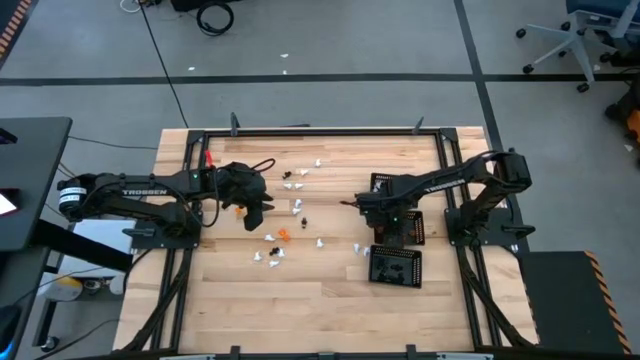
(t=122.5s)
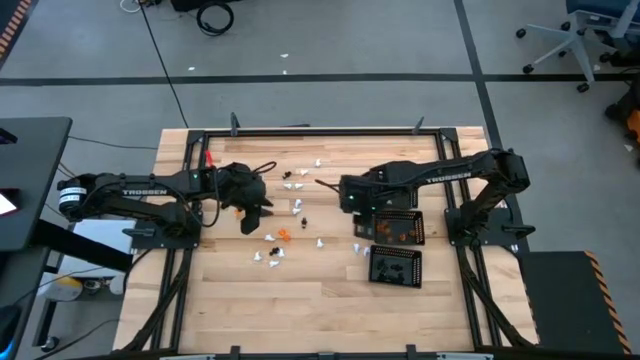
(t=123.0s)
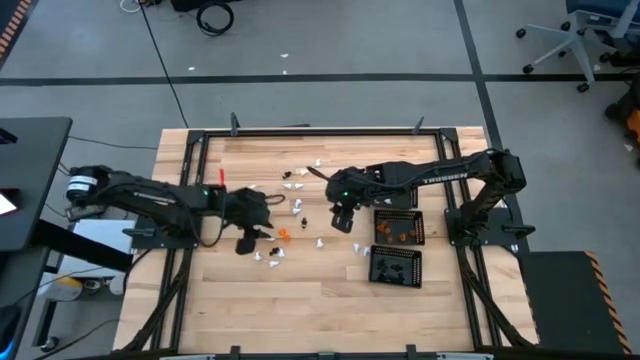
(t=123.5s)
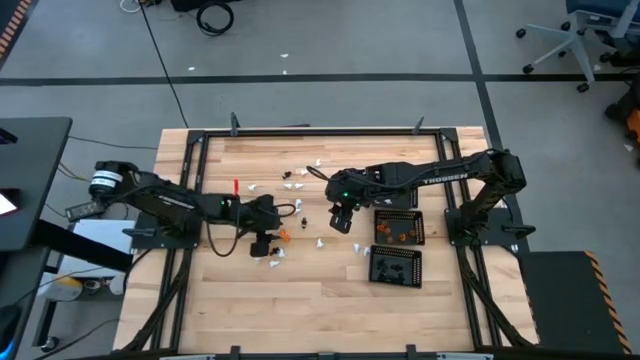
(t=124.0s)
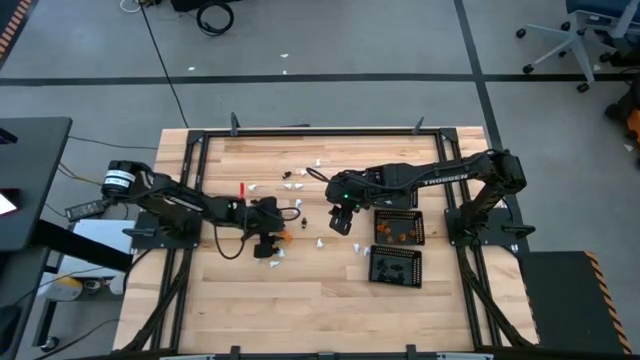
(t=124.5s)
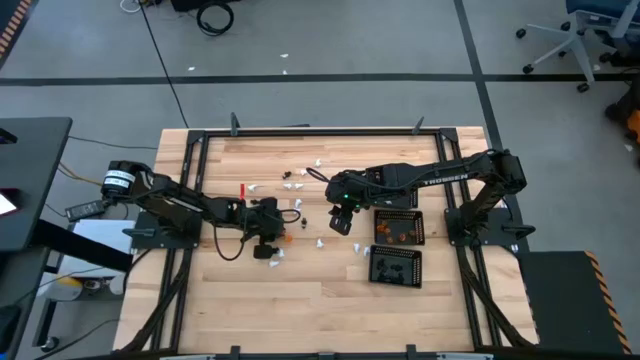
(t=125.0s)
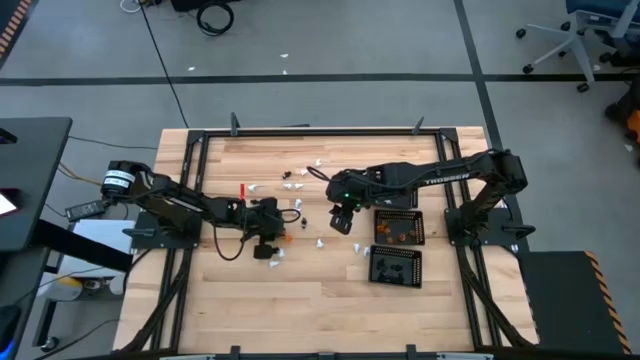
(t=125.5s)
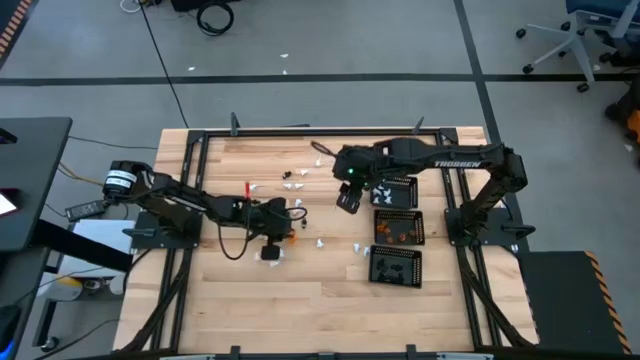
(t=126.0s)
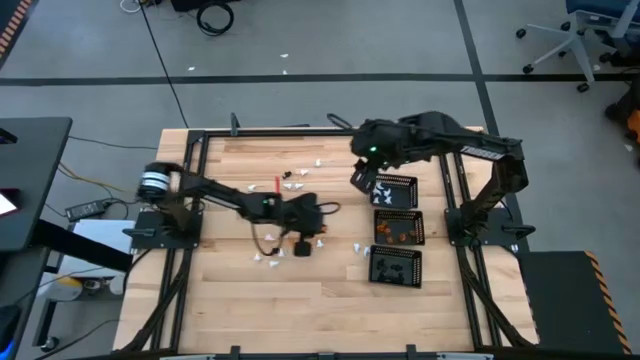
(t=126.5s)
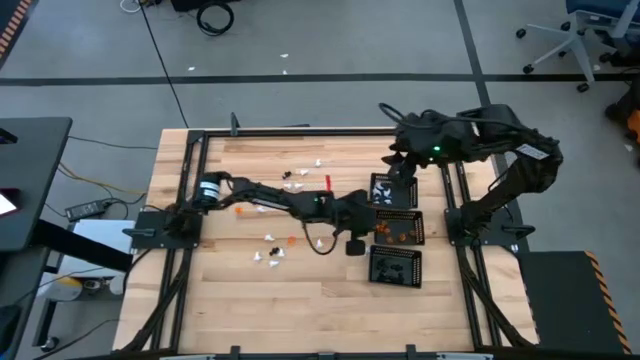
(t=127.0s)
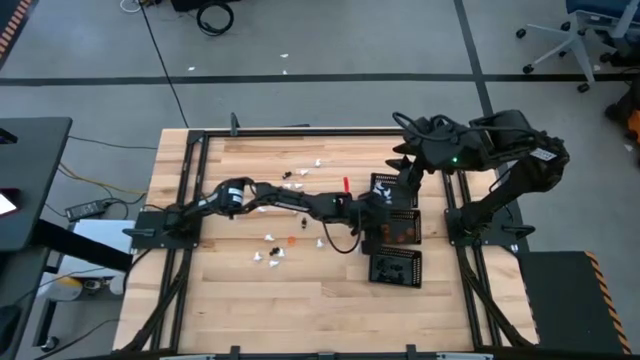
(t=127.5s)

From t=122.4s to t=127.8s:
Task: Sort Halloween decoration
Put the orange pumpkin toy into the center black bin

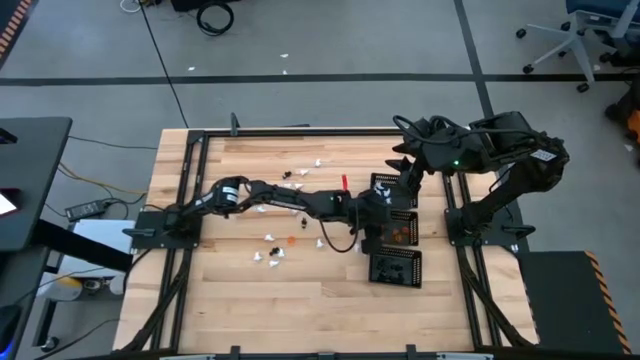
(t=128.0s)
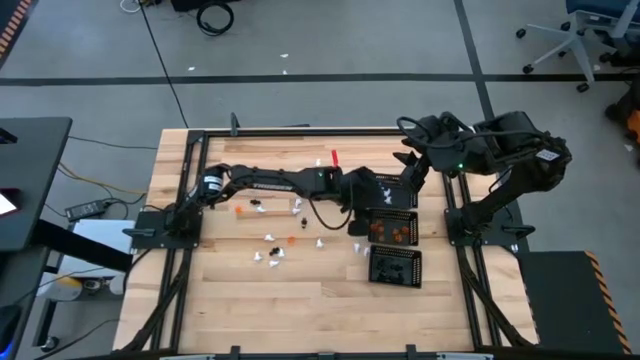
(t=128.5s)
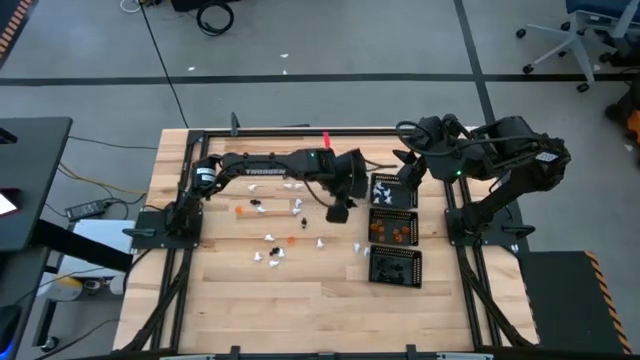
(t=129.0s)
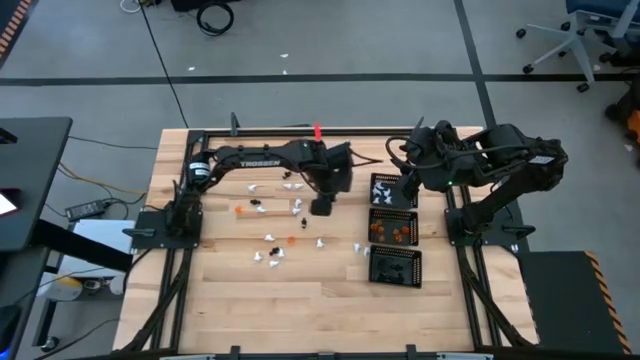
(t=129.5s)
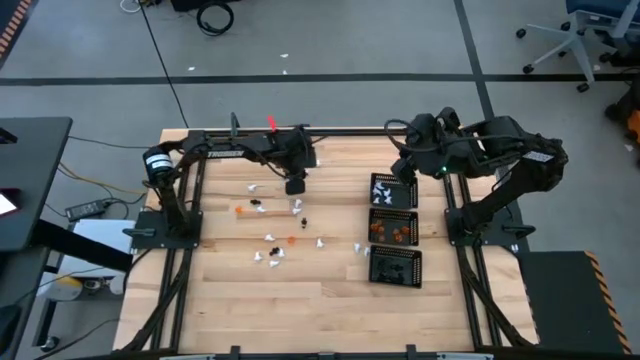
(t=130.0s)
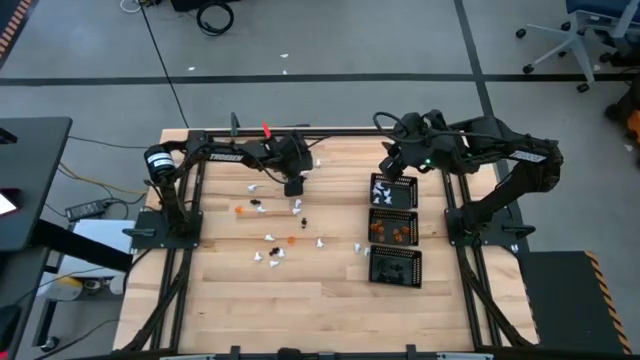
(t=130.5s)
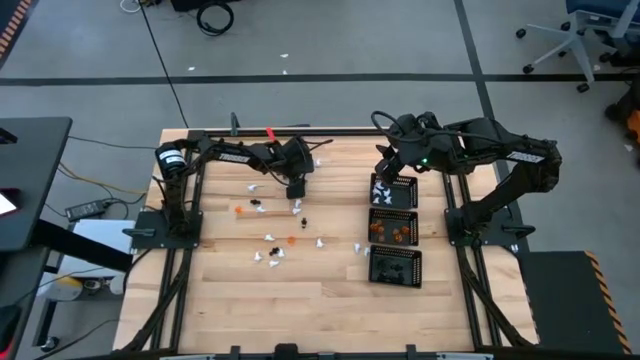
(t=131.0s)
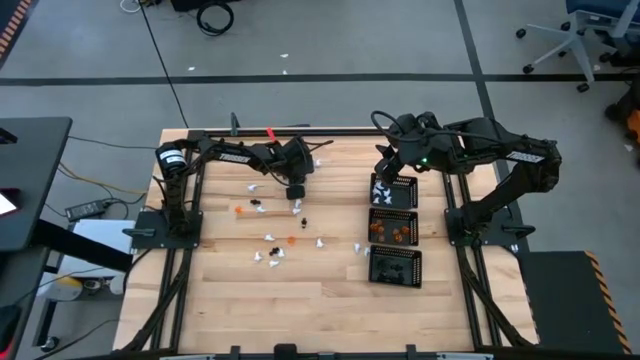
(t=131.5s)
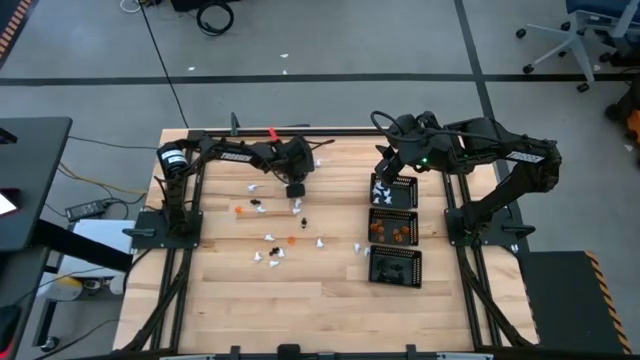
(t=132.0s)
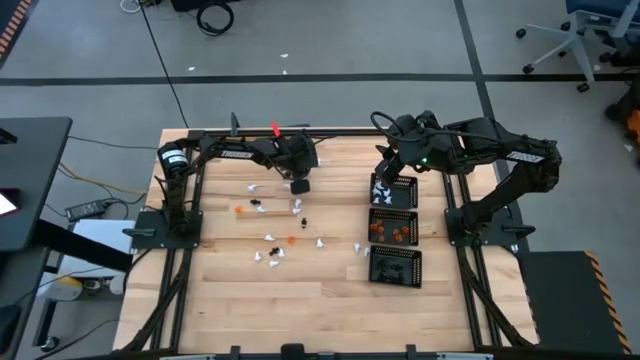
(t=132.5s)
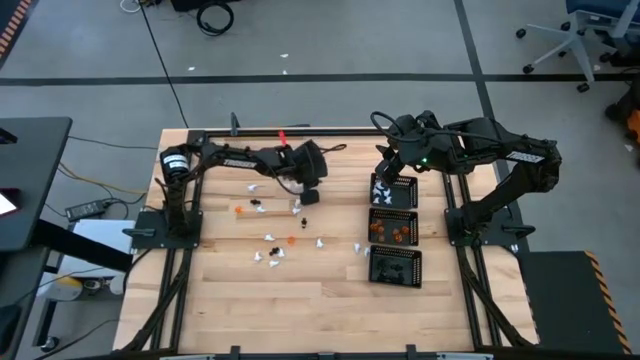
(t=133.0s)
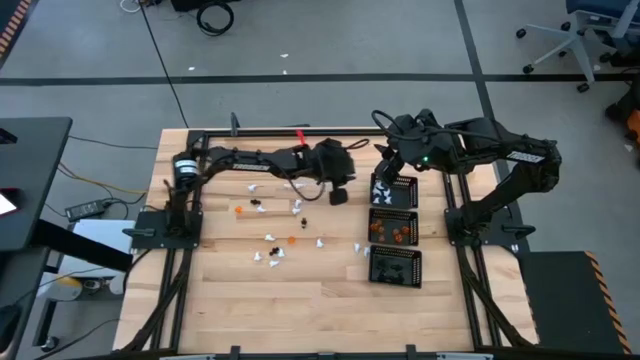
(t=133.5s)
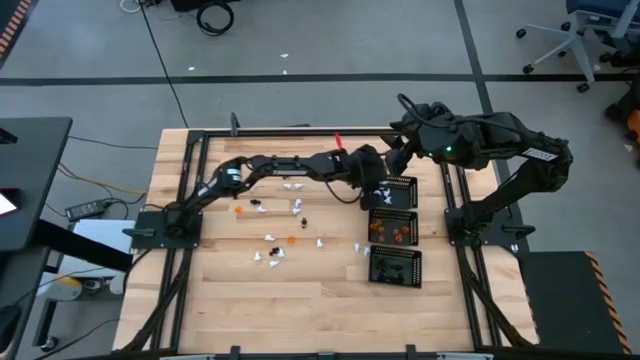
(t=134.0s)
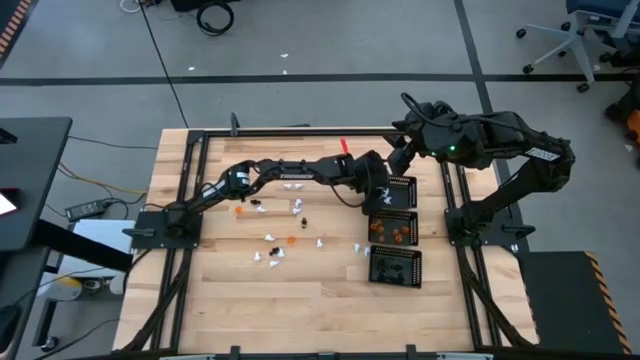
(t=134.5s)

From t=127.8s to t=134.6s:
Put the white ghost toy into the top black bin

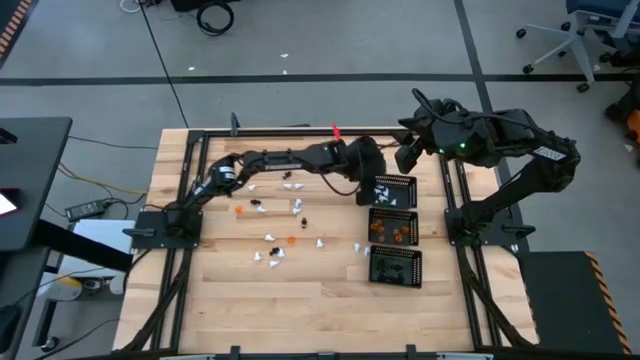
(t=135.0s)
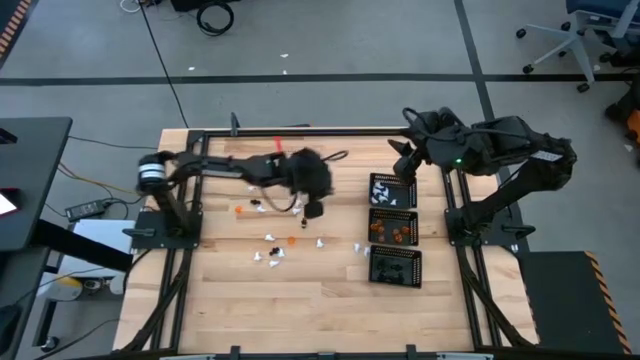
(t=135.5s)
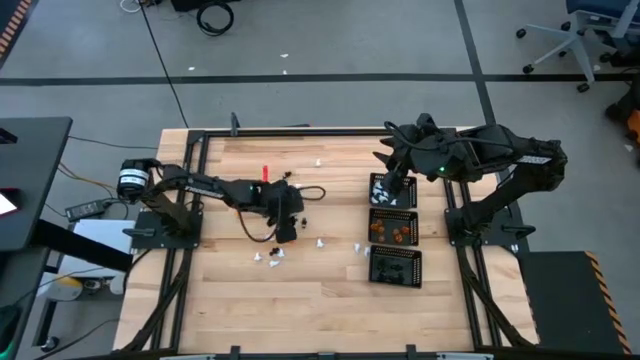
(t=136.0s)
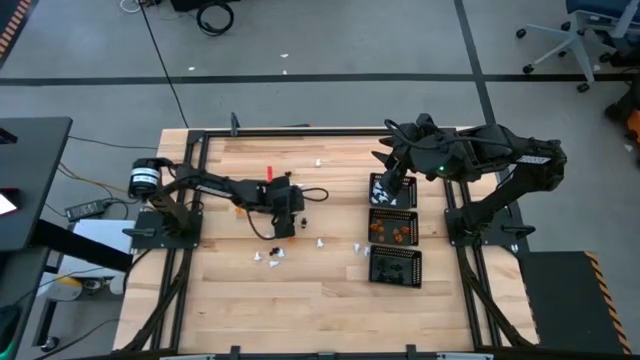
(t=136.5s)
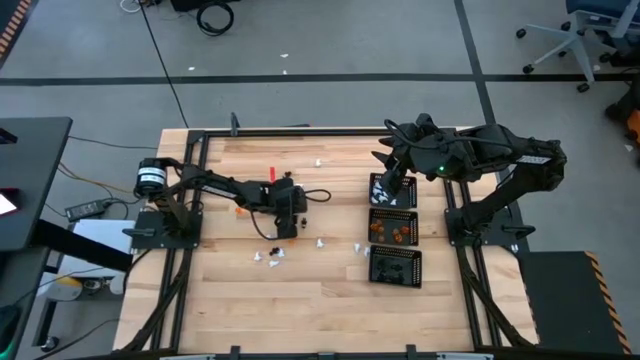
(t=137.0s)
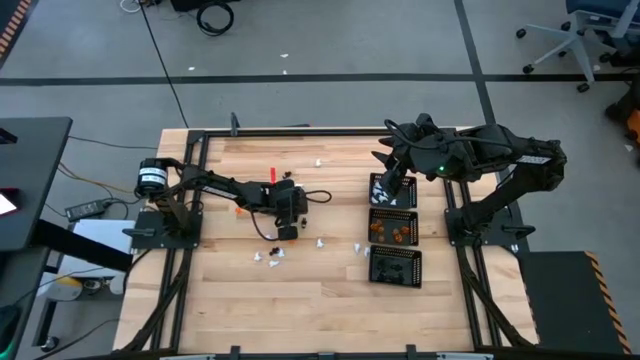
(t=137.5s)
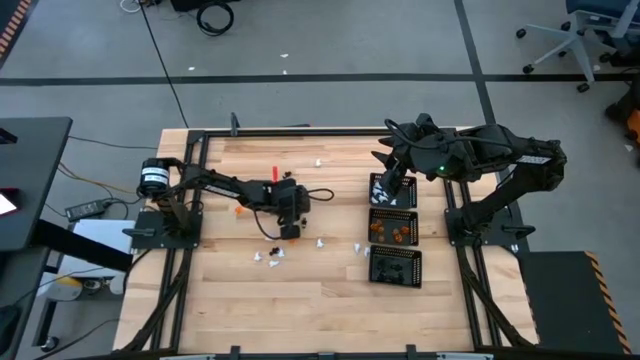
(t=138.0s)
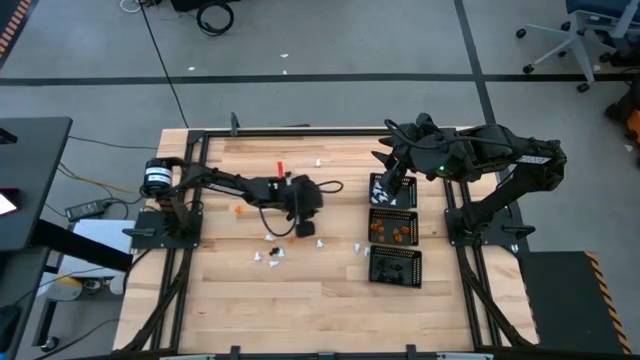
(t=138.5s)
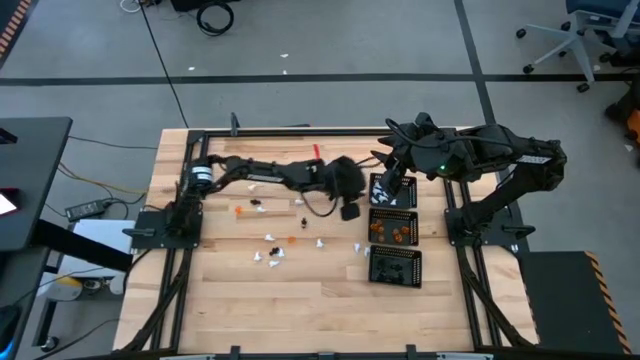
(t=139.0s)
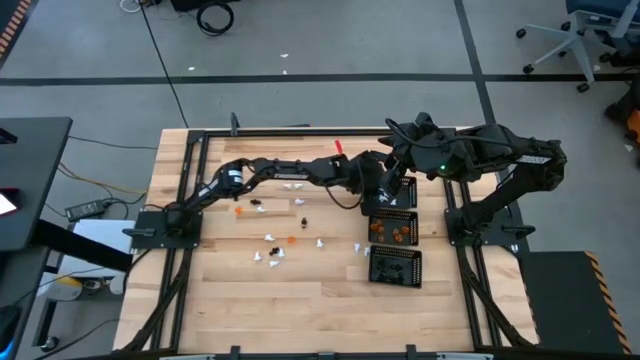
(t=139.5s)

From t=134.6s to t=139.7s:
Put the white ghost toy into the top black bin

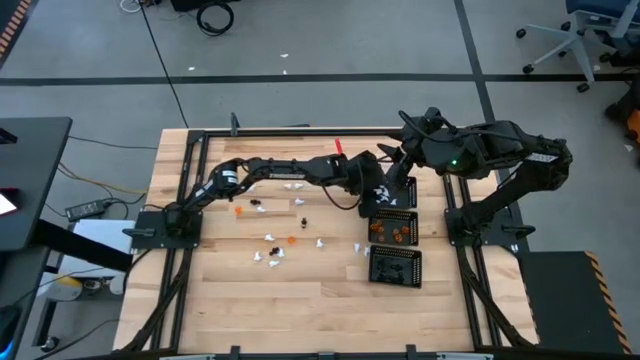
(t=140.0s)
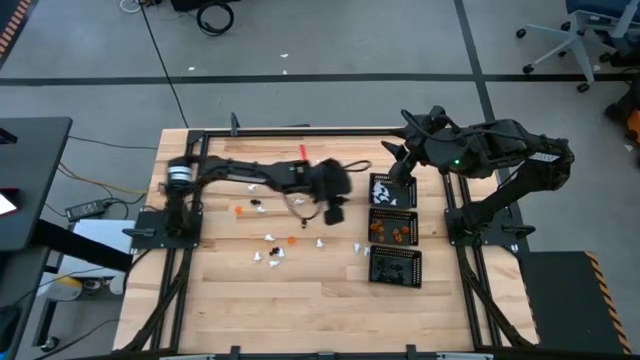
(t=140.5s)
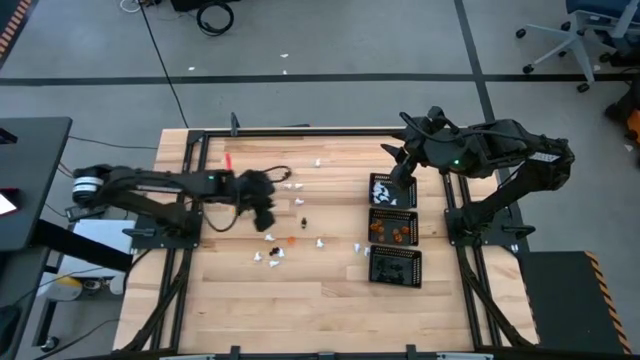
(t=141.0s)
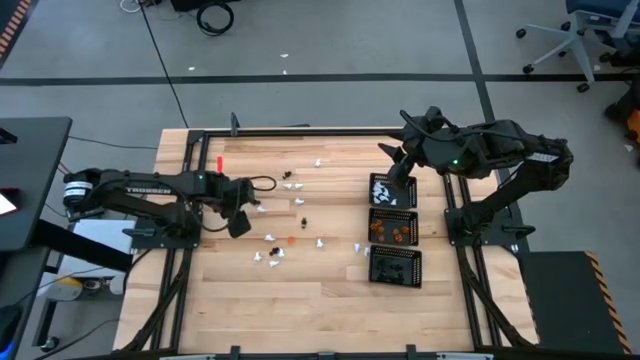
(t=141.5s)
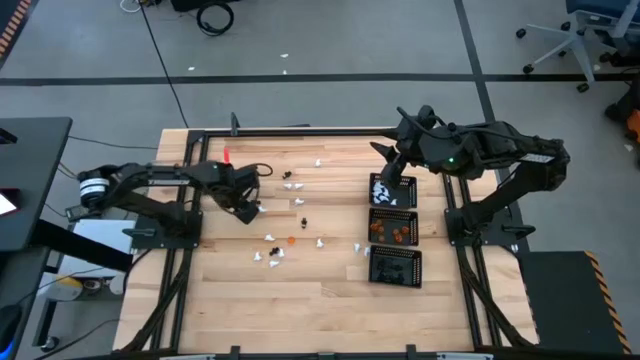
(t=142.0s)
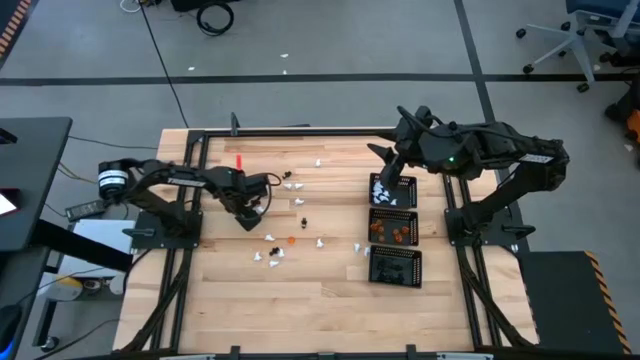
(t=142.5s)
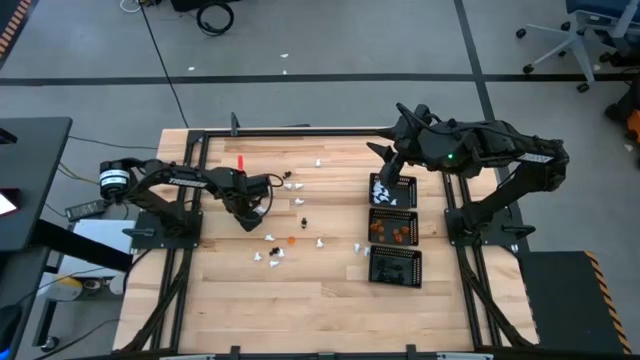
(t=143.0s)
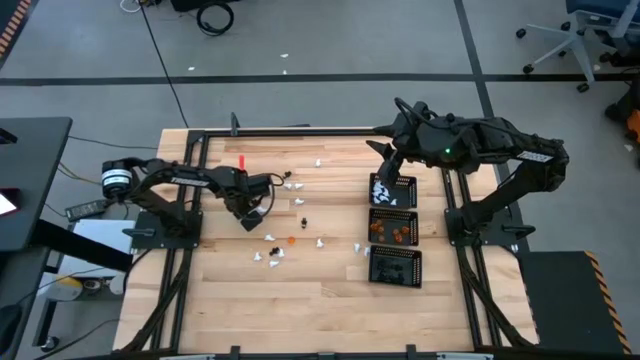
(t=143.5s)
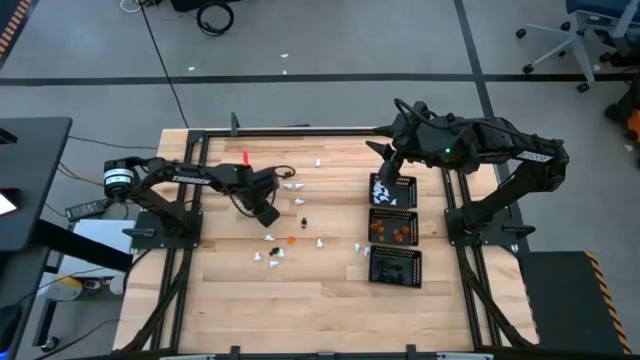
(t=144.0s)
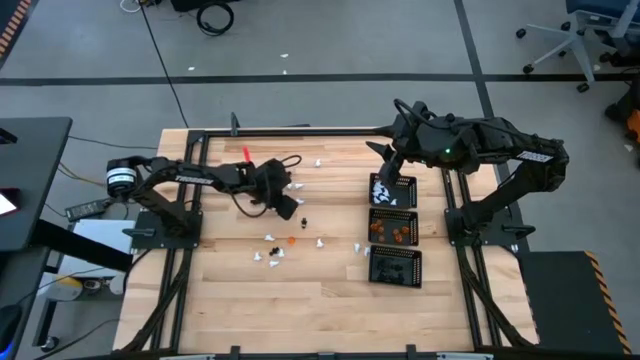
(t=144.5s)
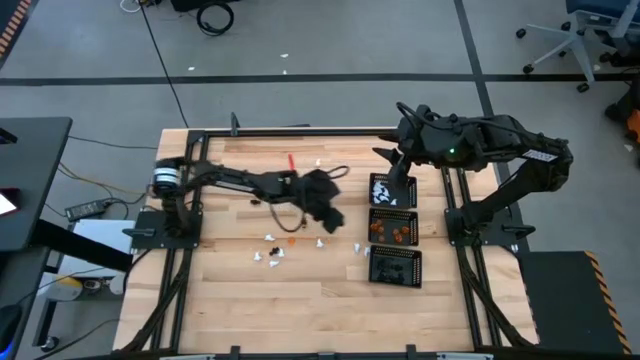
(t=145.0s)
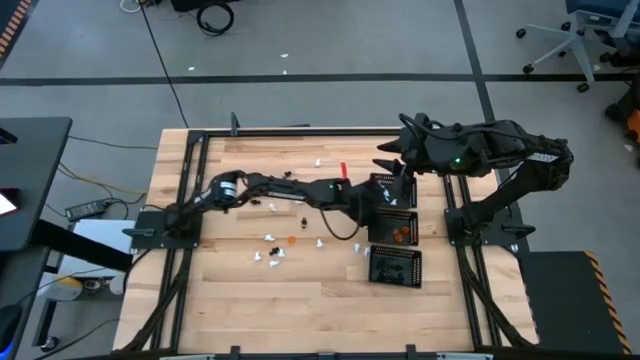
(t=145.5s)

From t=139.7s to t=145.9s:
Put the orange pumpkin toy into the center black bin
